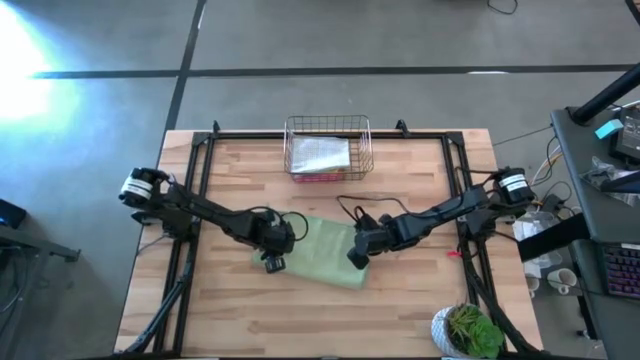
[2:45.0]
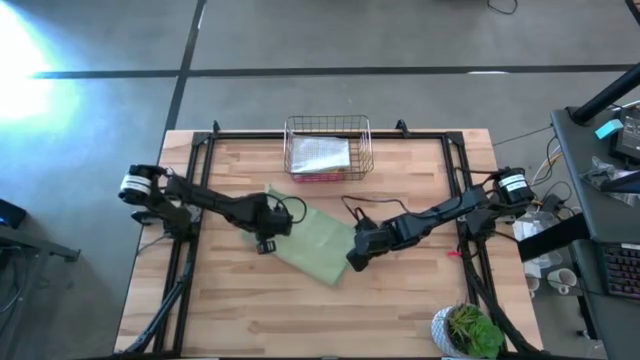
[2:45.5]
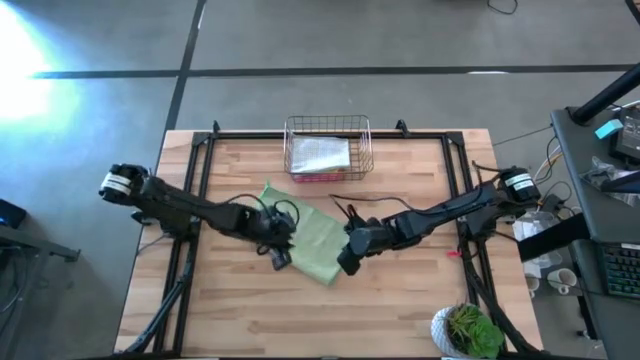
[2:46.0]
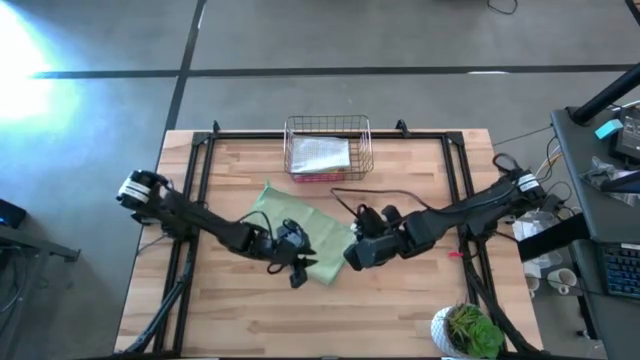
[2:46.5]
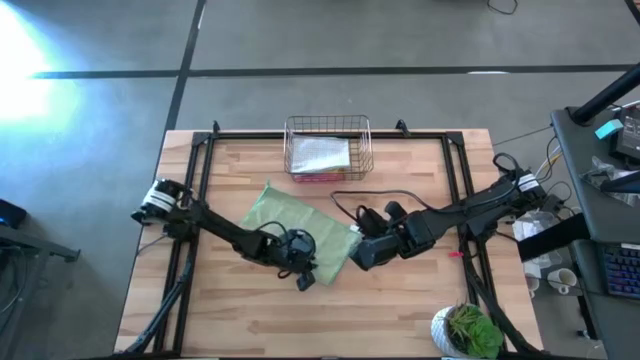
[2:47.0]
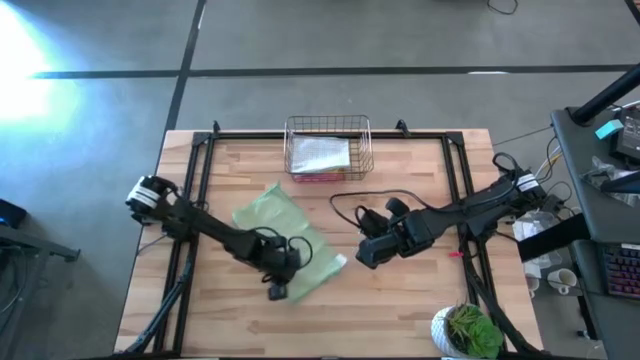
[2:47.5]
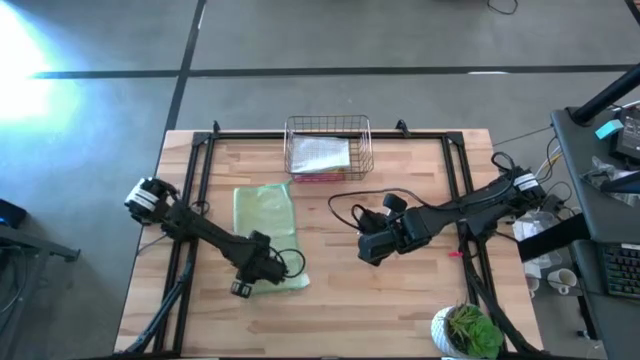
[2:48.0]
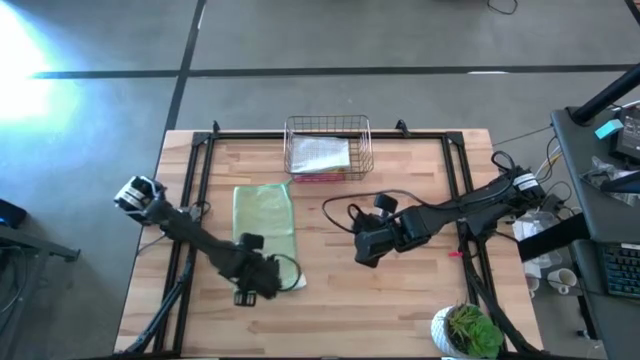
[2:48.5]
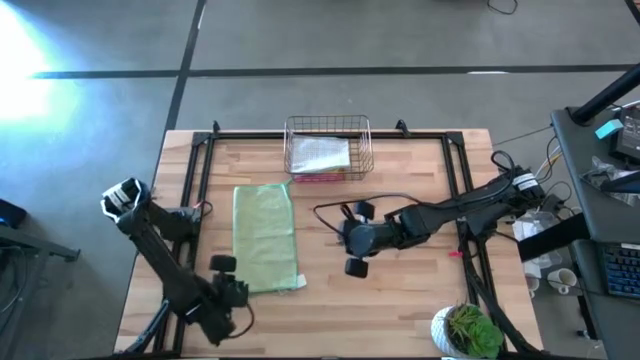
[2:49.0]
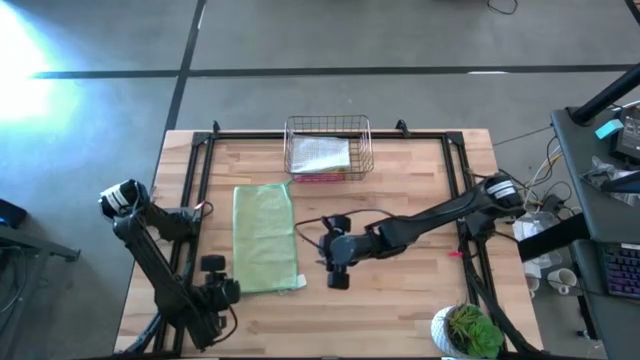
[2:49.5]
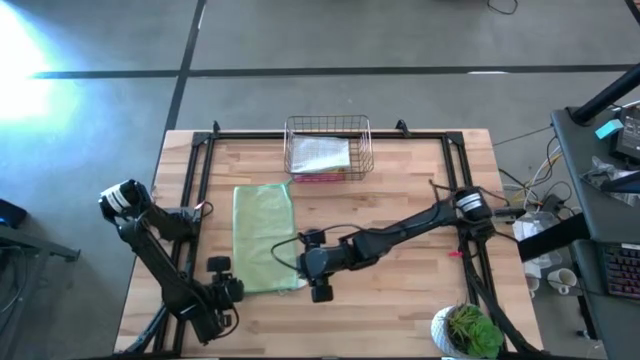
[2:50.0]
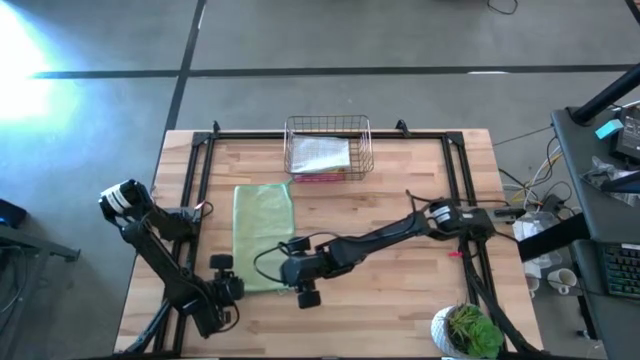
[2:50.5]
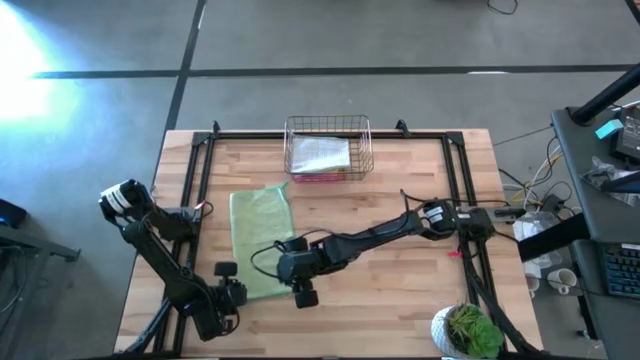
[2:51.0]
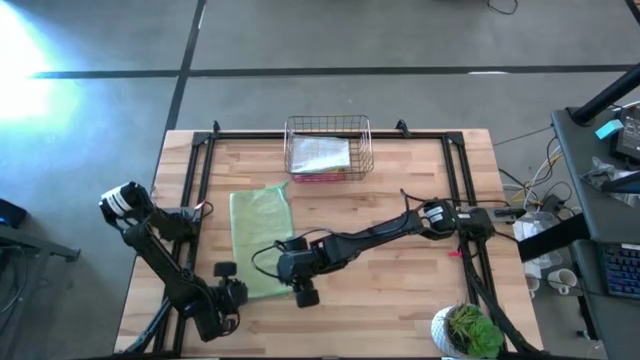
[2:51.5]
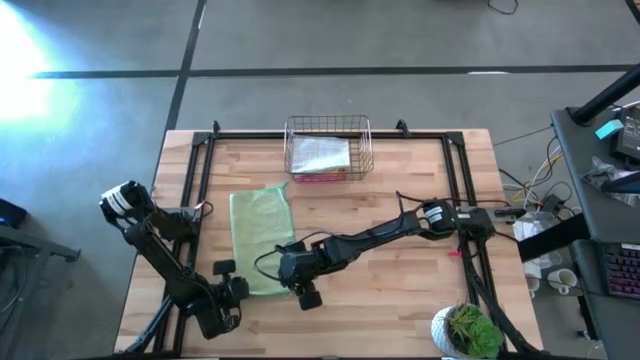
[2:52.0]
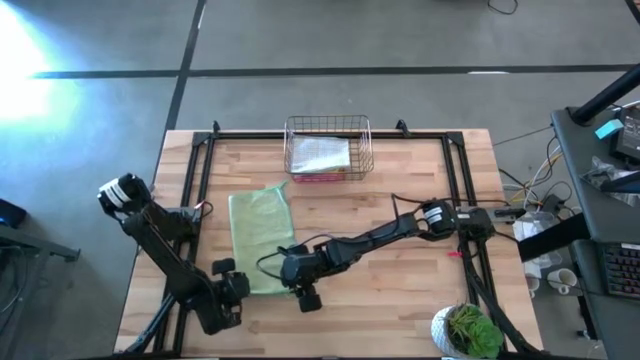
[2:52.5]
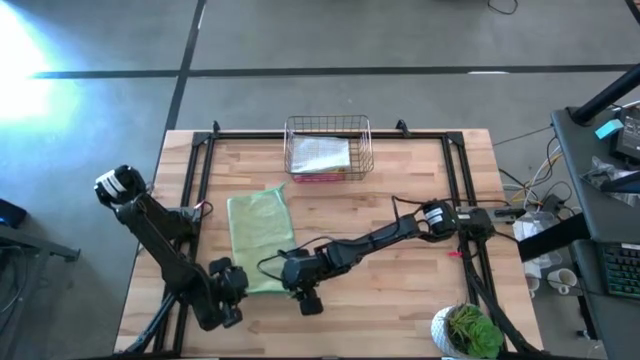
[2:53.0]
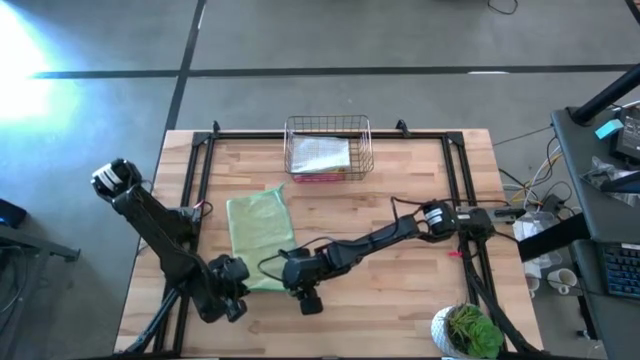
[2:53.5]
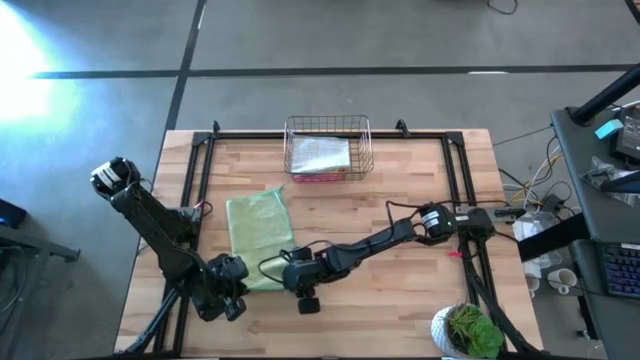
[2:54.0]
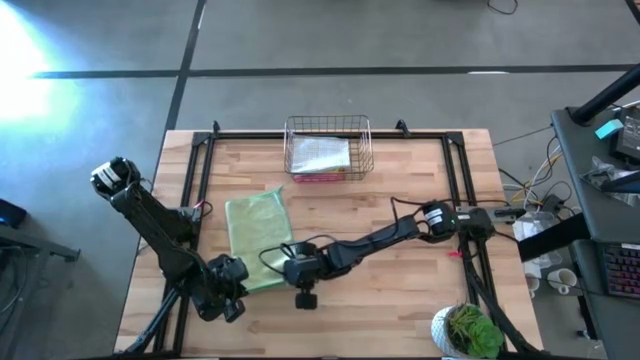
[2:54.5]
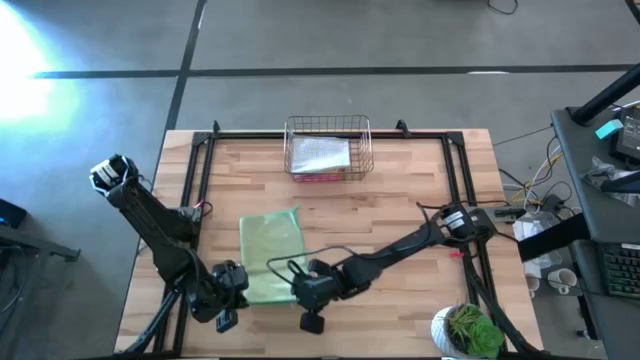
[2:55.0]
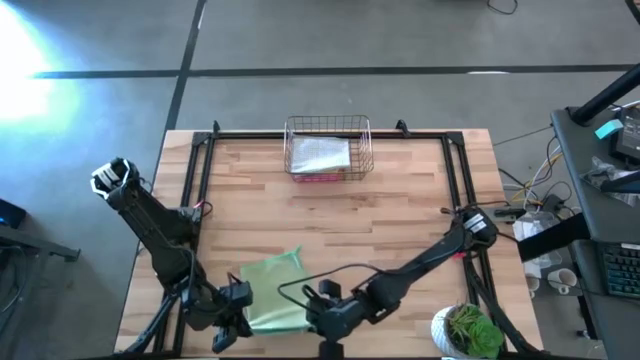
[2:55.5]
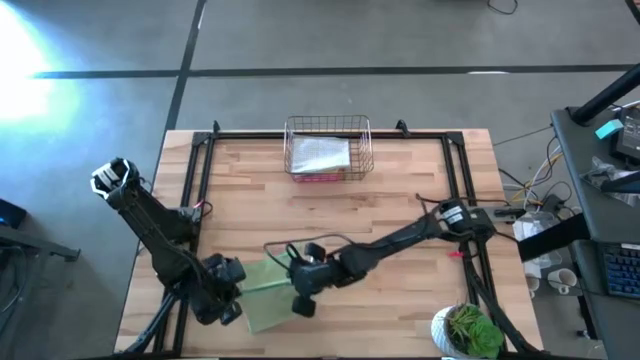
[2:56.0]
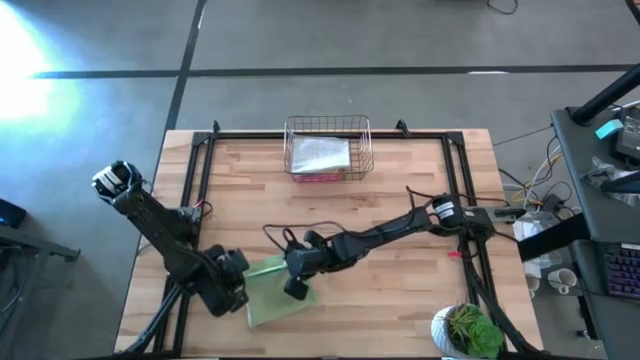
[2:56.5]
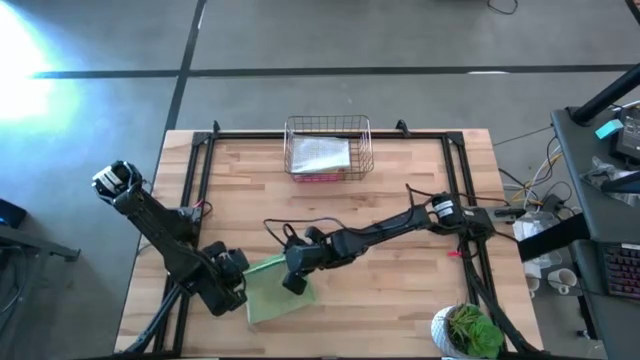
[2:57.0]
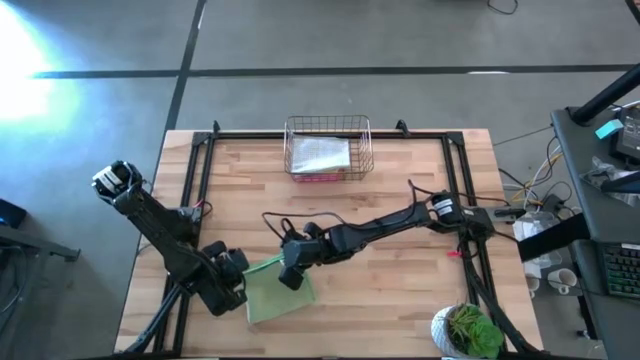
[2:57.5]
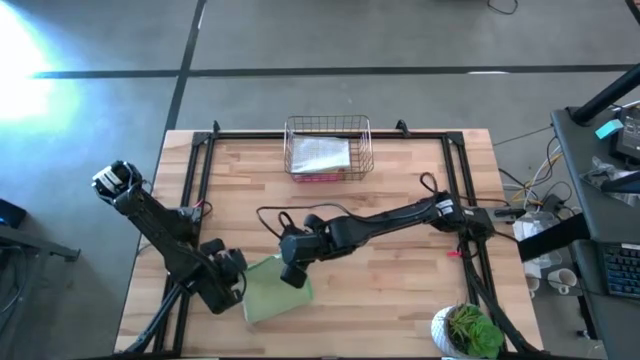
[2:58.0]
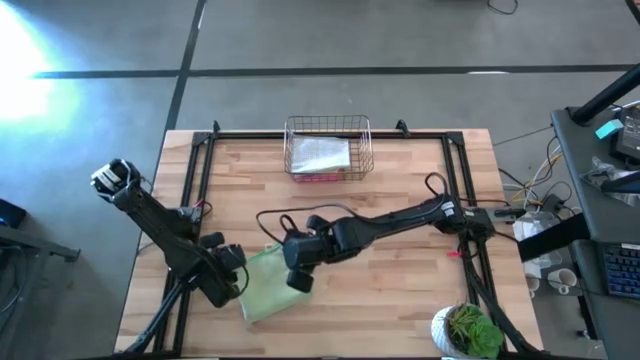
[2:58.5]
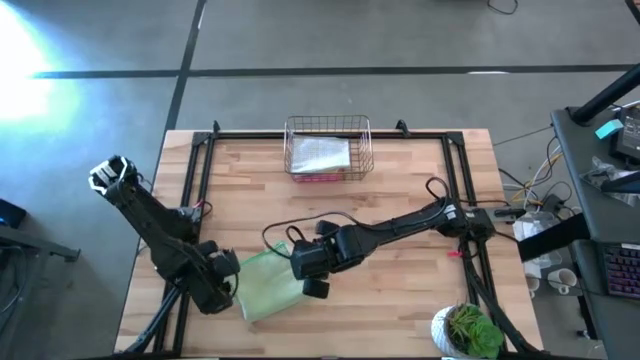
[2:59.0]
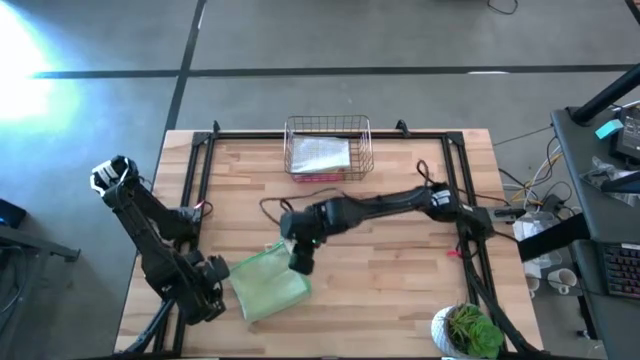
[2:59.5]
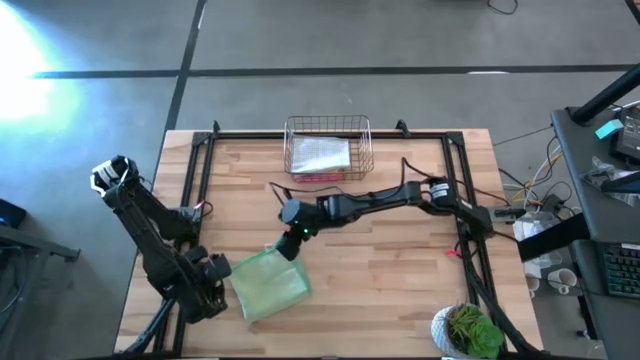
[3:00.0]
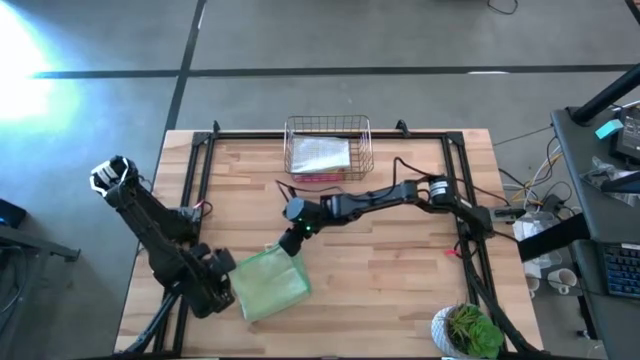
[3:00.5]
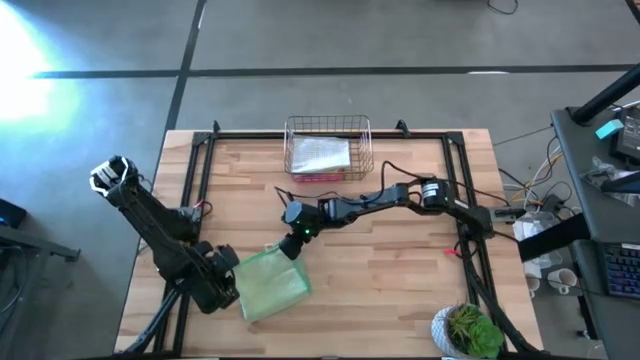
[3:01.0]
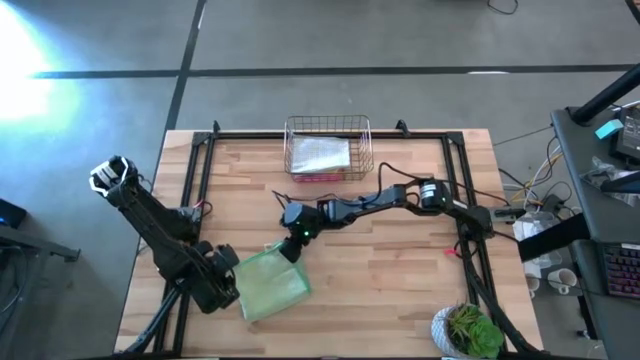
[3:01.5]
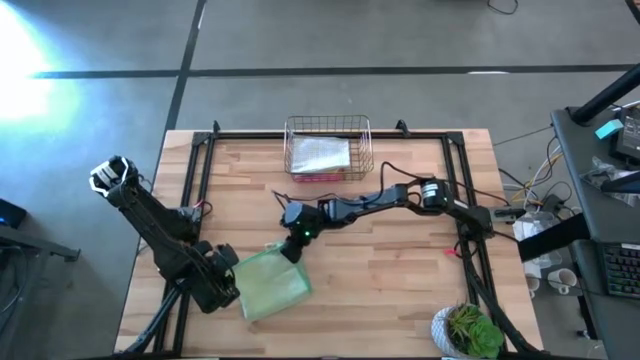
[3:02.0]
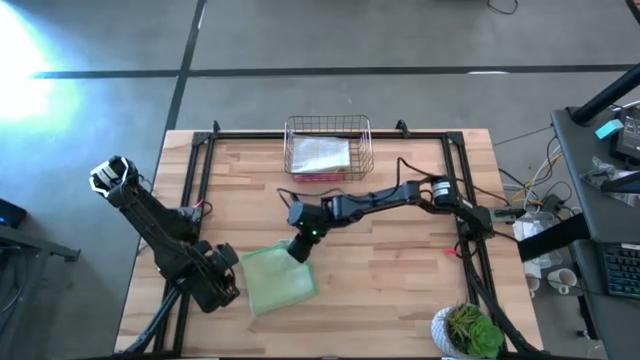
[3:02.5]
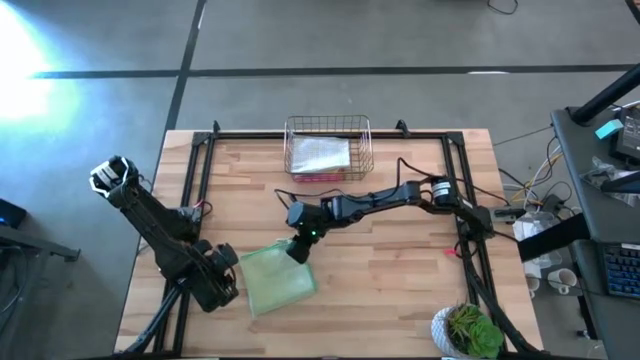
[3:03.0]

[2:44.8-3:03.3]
Task: Fold microfiber towels
Fold the light green microfiber cloth

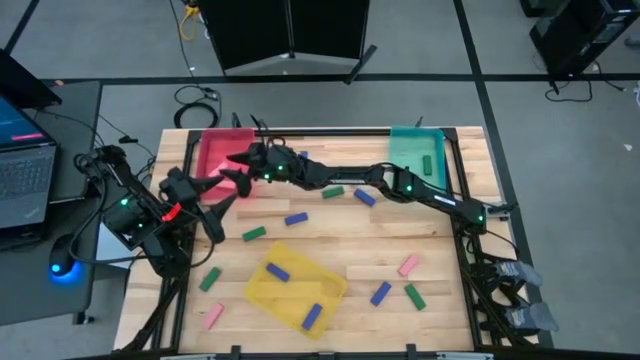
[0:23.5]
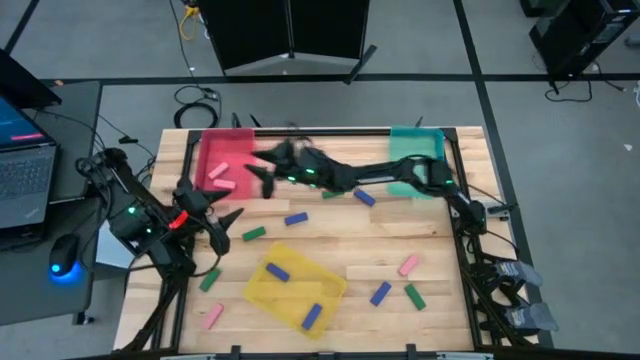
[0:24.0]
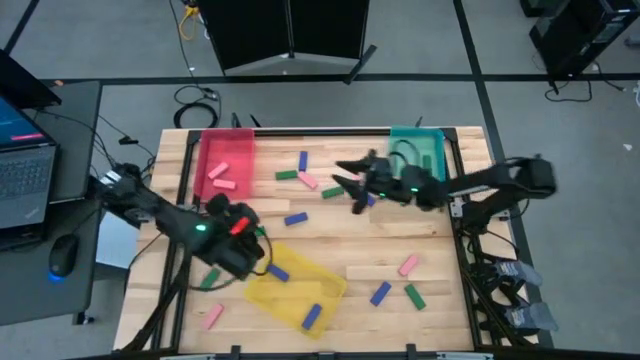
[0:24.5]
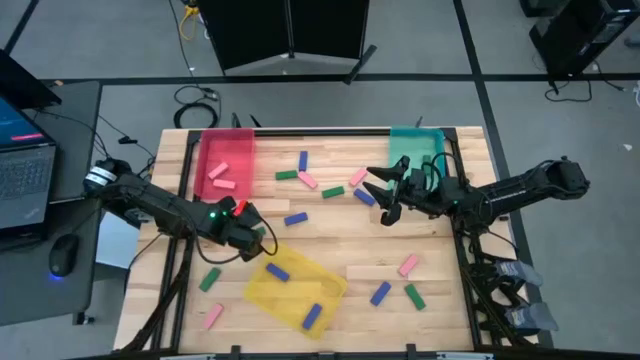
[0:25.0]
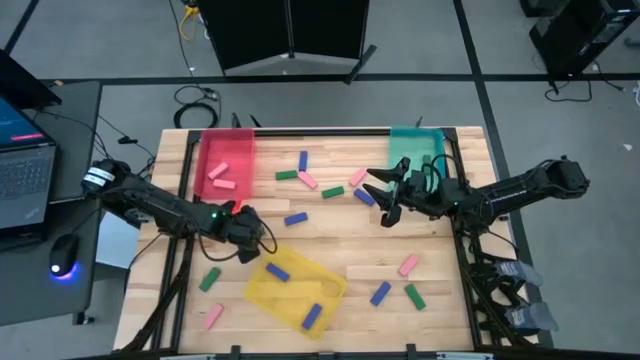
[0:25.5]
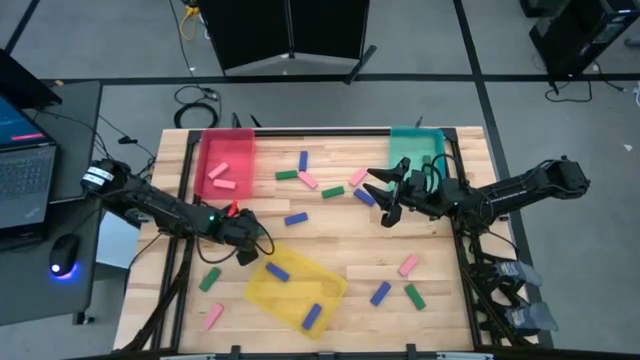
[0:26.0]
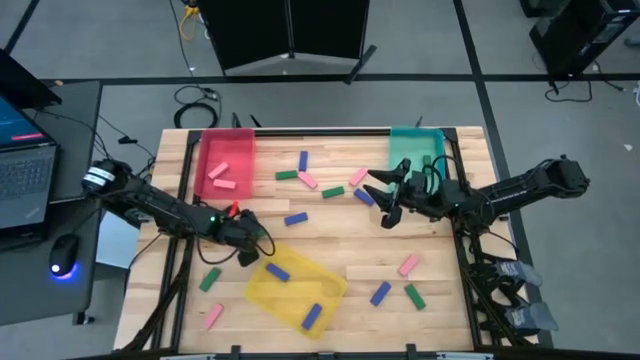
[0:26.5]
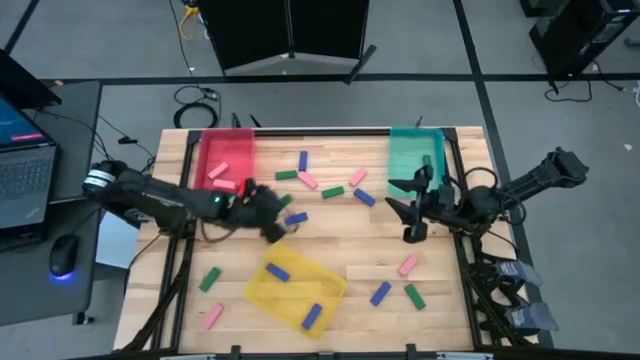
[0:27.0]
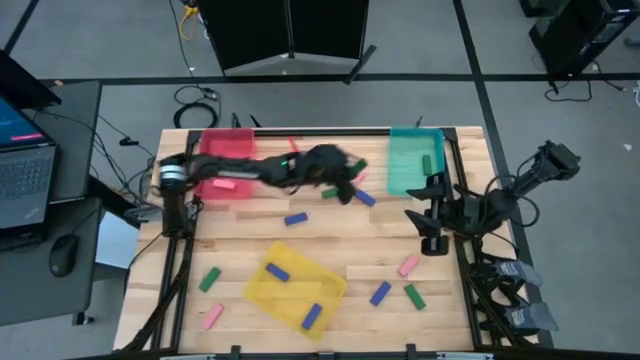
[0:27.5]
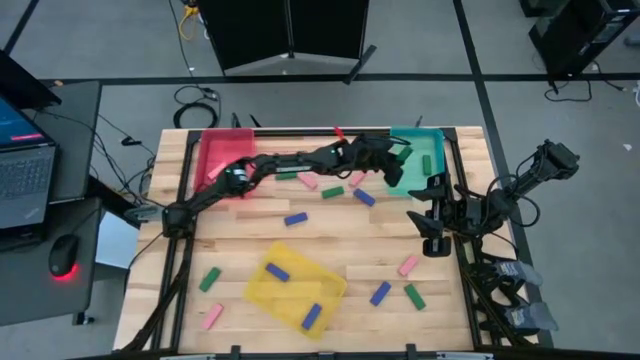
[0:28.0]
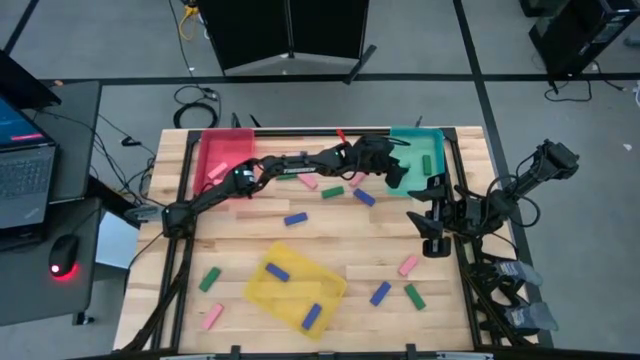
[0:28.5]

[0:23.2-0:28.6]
Task: Sort blocks
Put the green block into the blue bin
